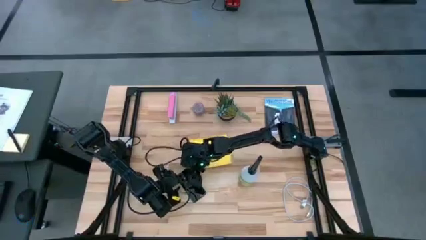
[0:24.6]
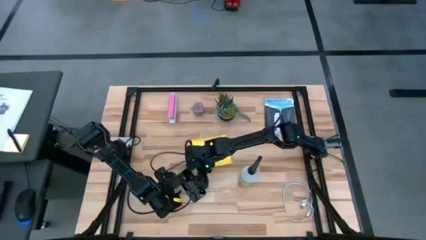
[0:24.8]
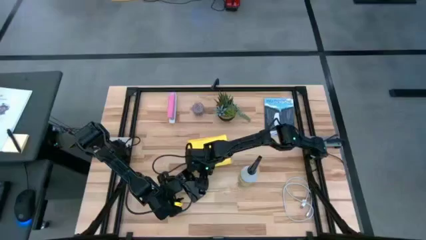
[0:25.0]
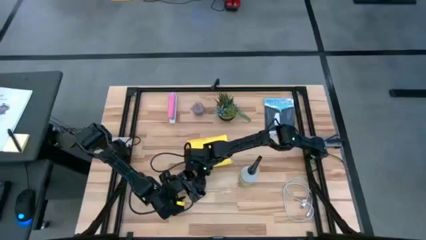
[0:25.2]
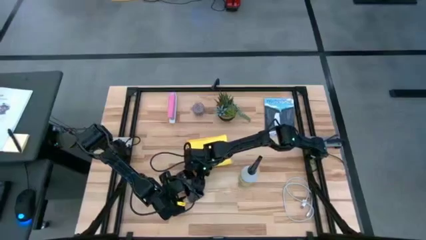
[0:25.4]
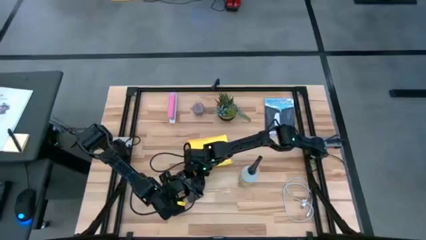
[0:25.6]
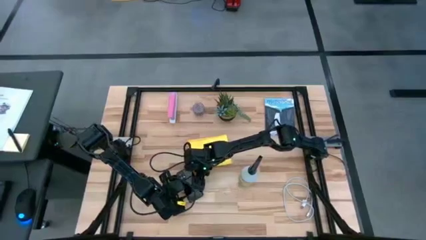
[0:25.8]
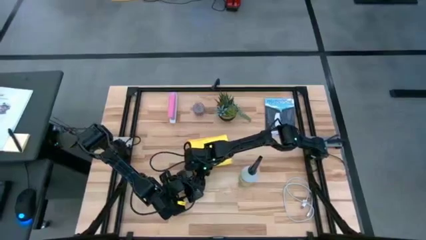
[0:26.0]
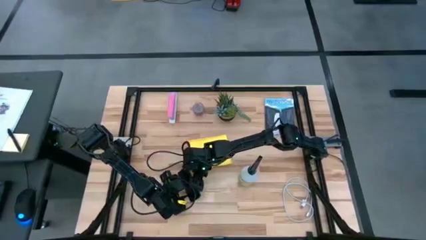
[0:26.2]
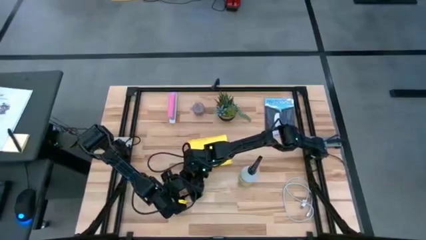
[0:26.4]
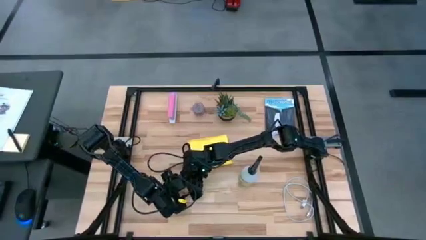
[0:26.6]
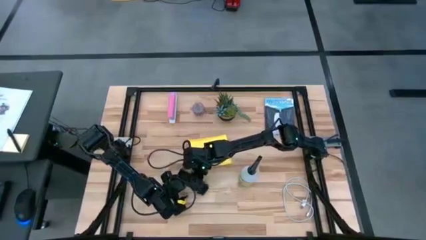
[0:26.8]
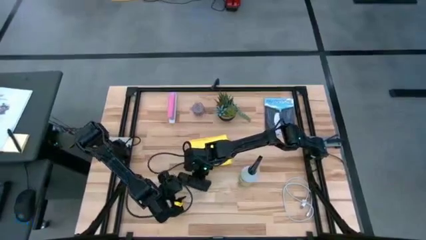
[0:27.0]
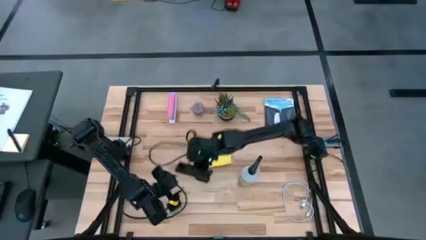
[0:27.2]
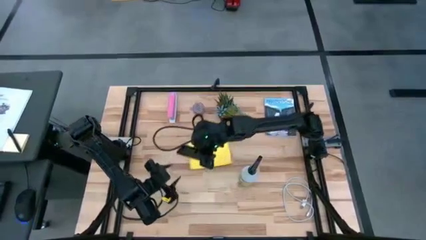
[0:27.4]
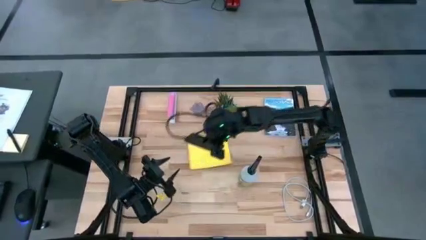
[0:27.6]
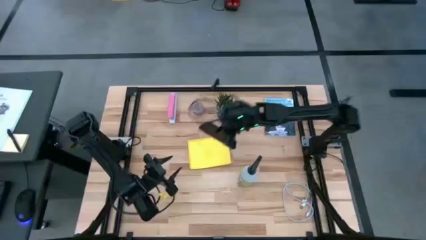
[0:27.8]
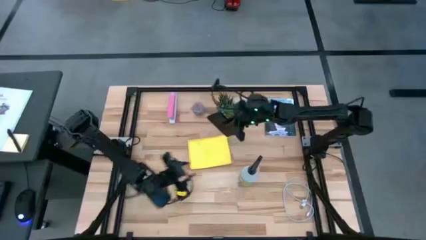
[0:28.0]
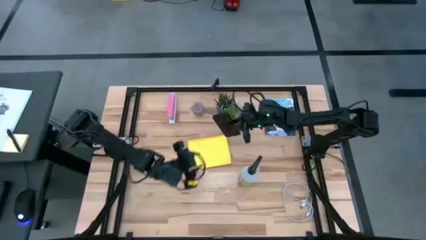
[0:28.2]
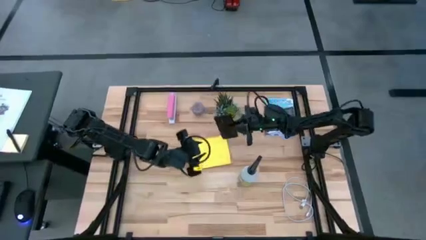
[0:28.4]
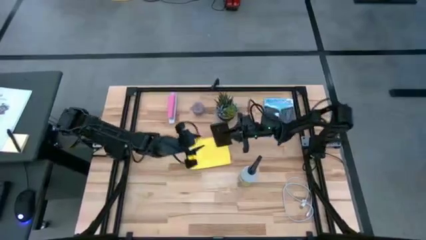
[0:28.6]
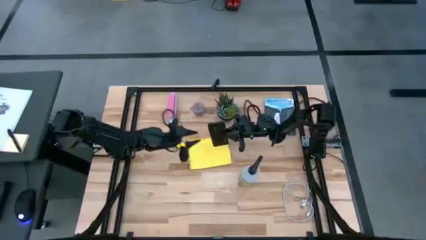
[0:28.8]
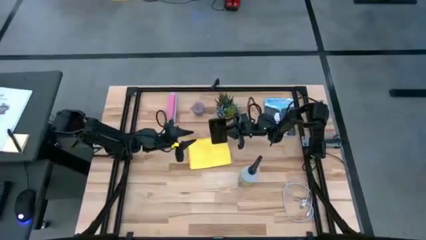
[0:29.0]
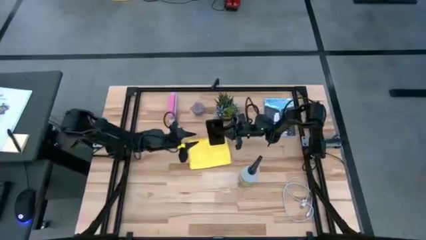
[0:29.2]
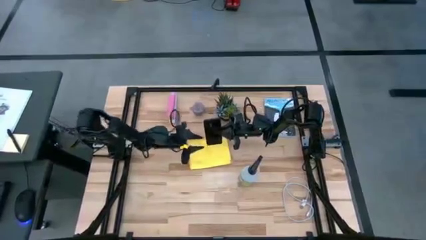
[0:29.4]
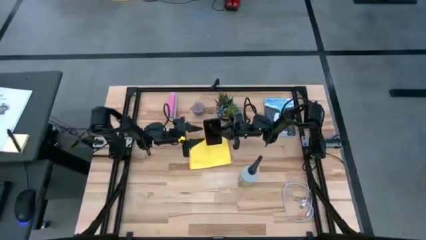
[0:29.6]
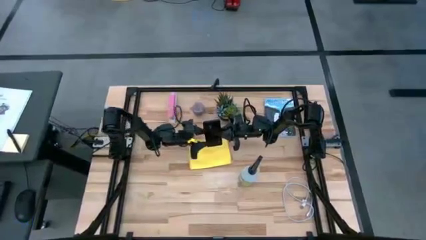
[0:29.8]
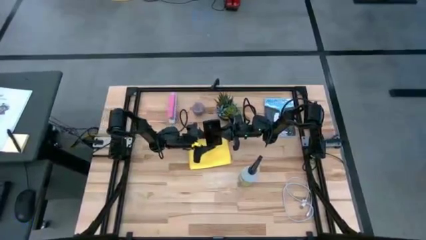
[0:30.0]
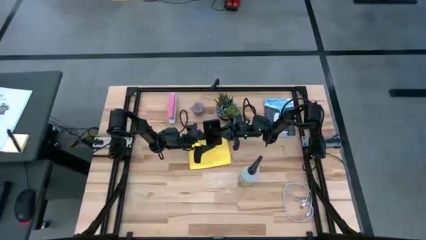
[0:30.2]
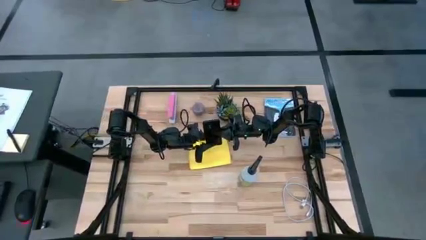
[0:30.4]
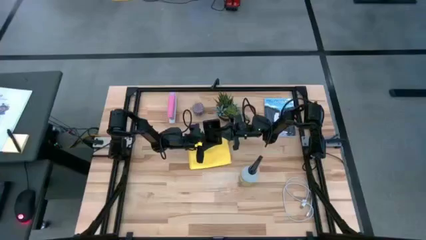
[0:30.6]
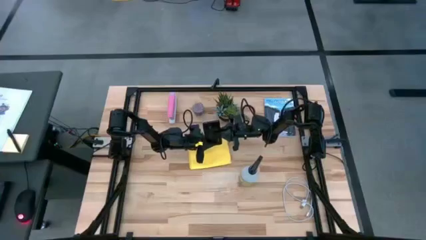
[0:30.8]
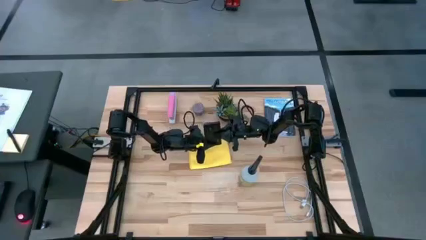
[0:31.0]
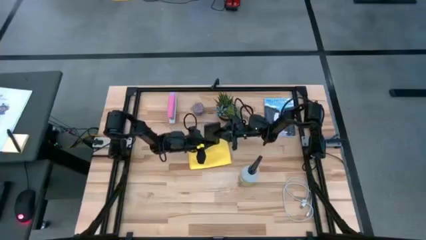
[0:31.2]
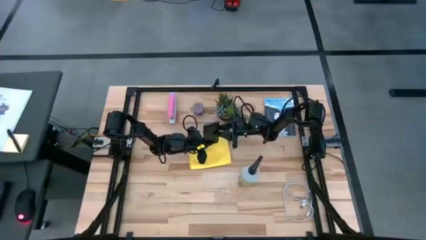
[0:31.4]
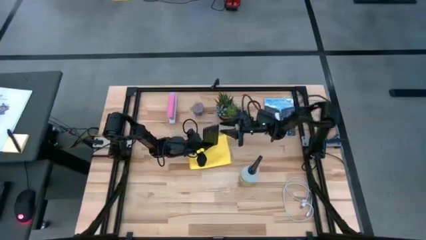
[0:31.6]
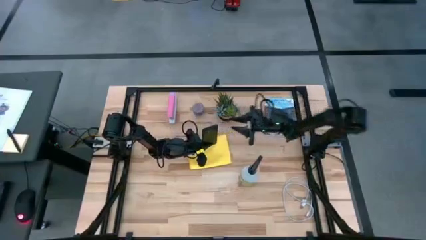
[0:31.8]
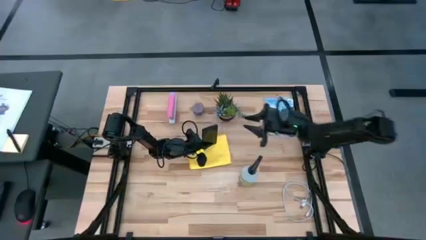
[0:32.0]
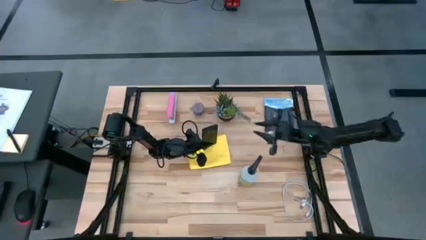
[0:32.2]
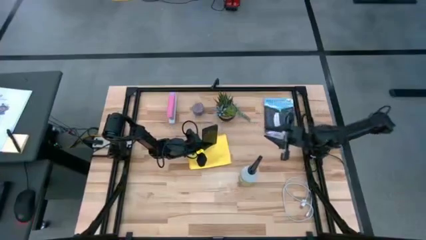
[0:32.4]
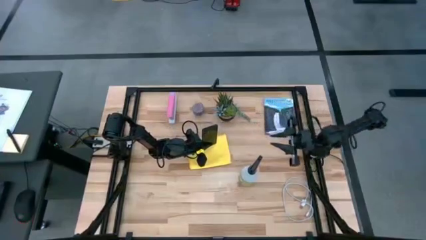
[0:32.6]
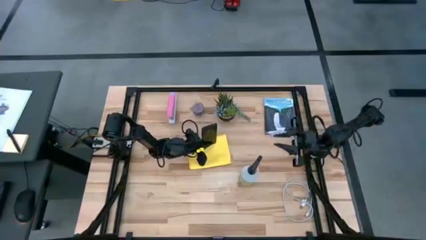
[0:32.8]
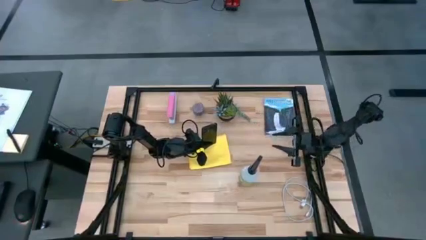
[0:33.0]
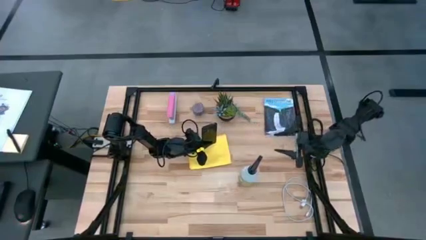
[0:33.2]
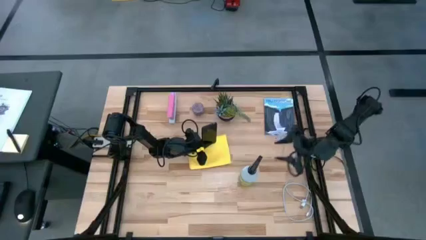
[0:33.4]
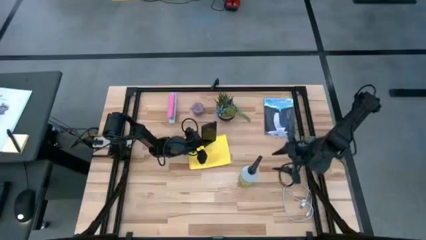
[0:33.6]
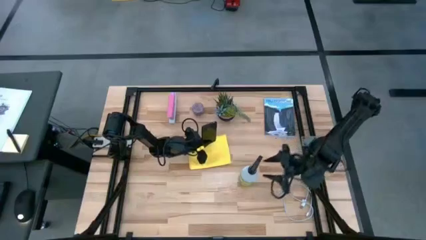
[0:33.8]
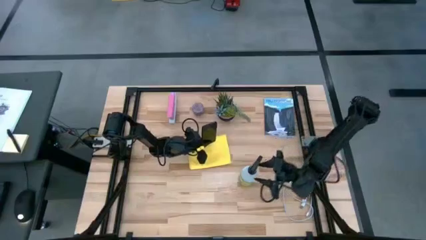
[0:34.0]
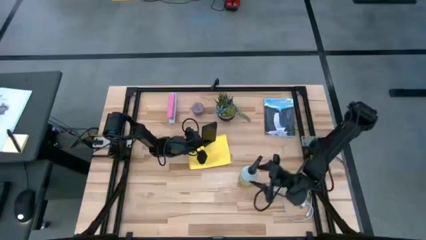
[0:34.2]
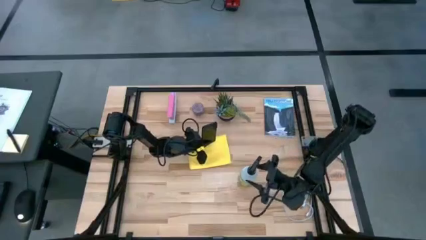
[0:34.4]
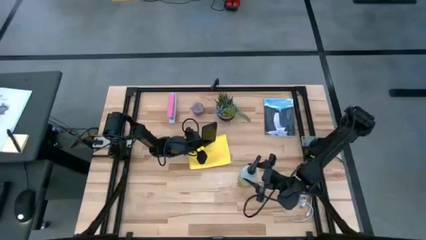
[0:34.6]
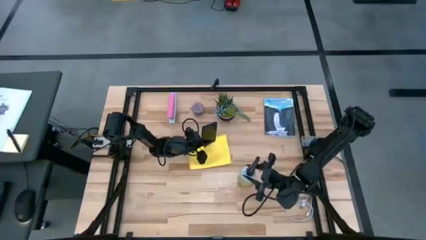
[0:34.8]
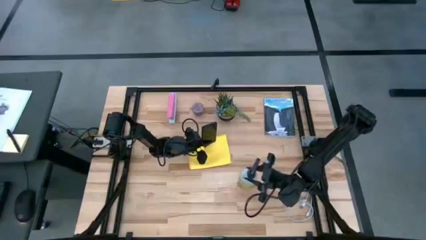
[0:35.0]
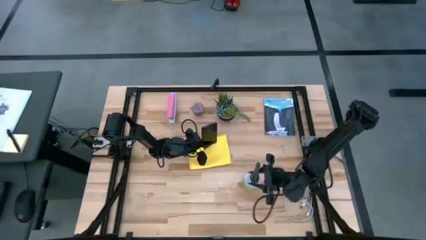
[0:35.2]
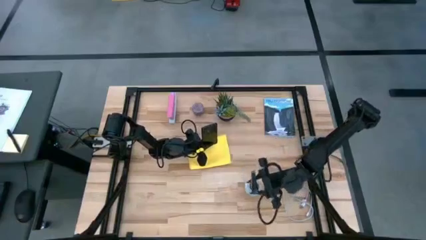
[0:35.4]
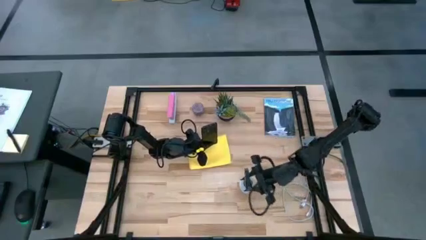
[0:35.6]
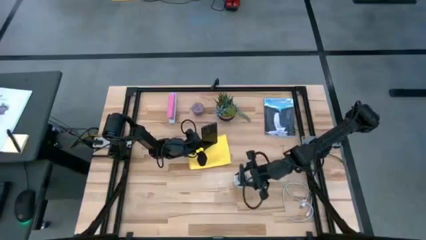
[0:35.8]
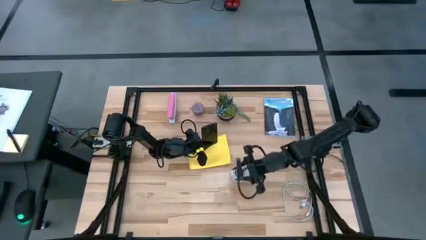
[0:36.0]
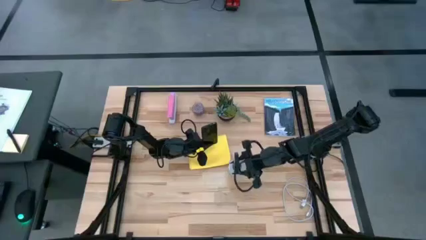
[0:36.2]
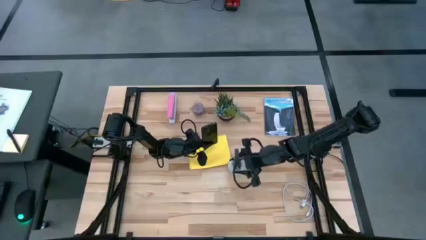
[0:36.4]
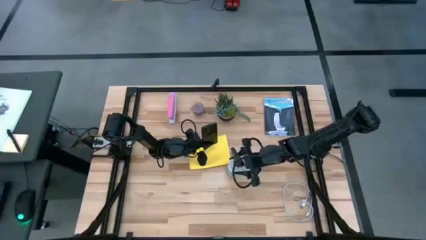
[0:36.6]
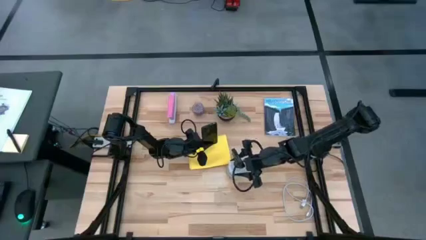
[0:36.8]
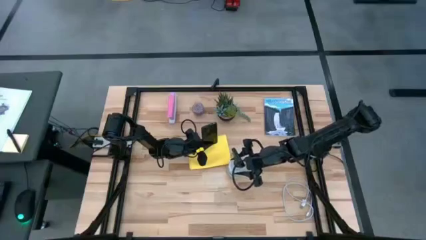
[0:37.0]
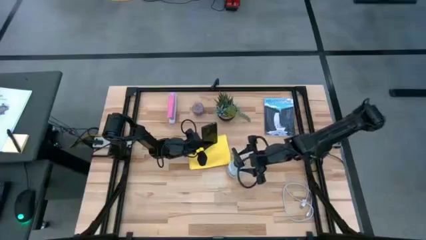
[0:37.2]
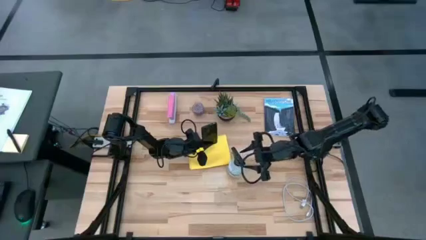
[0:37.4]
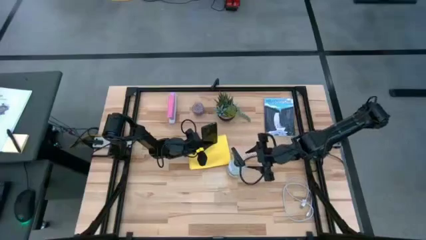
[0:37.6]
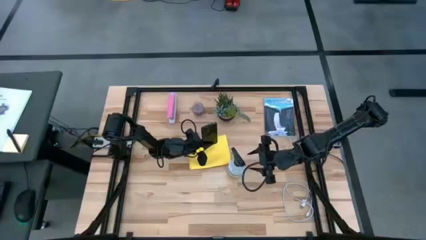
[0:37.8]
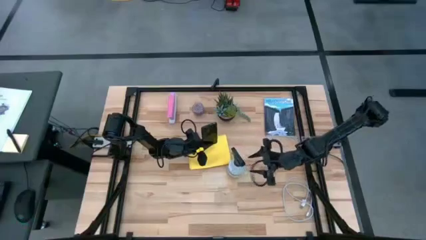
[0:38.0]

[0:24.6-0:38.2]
Task: Apply microfiber cloth
Spray the back of the cellphone with the spray bottle
